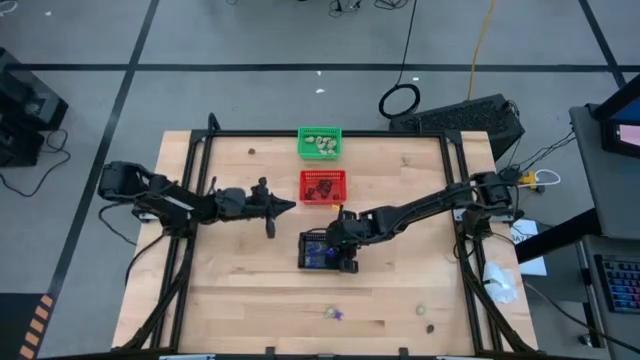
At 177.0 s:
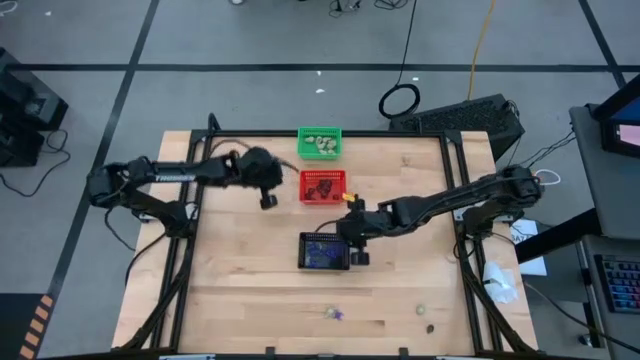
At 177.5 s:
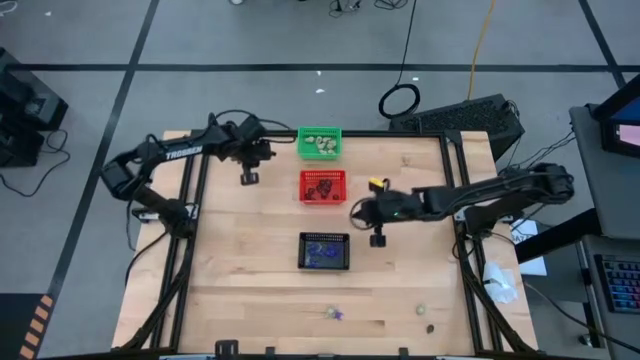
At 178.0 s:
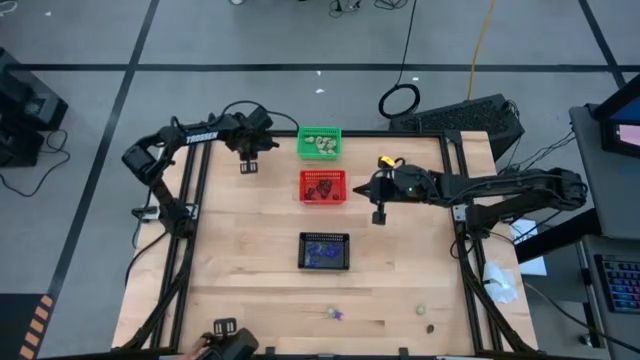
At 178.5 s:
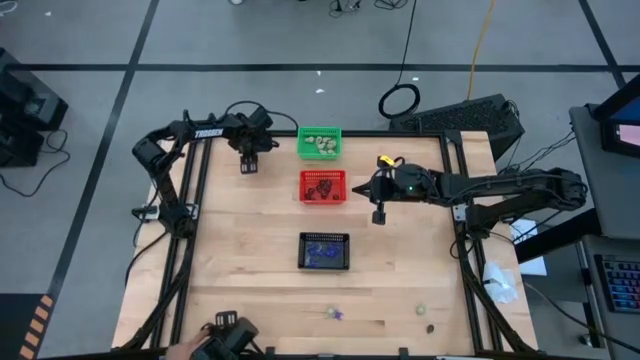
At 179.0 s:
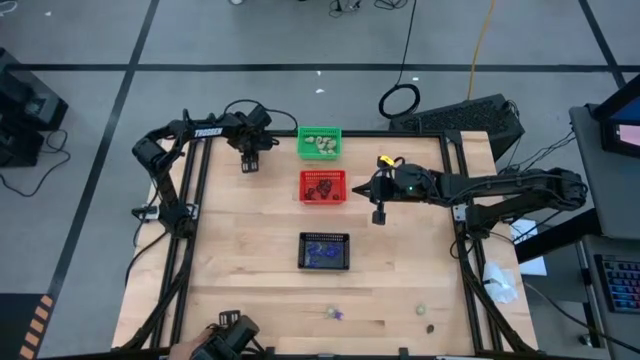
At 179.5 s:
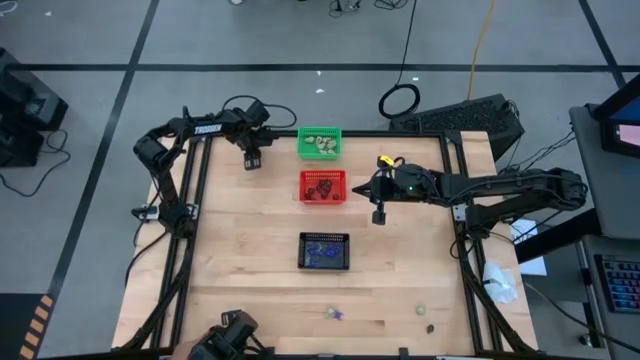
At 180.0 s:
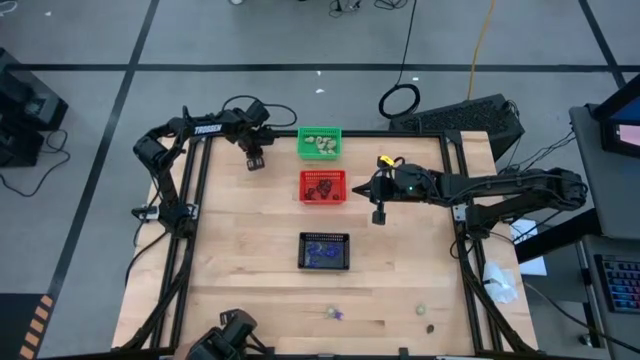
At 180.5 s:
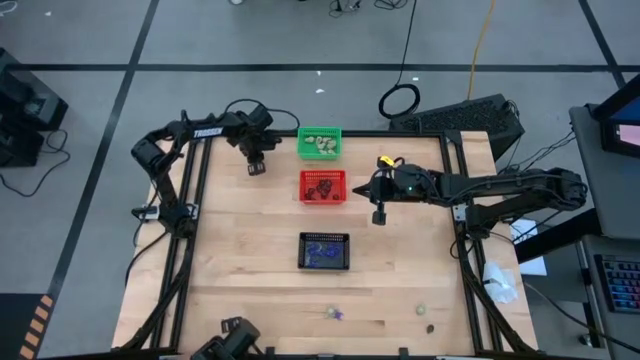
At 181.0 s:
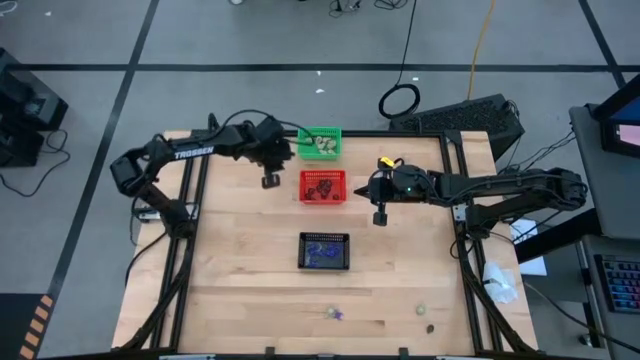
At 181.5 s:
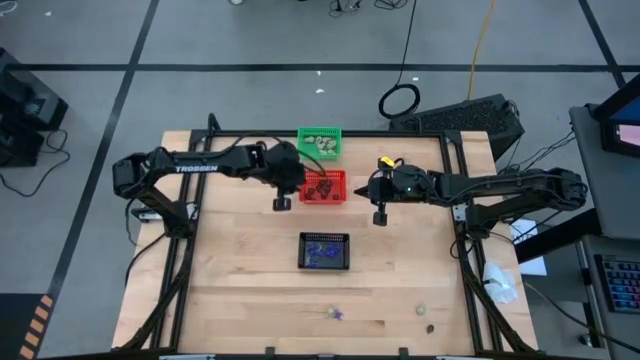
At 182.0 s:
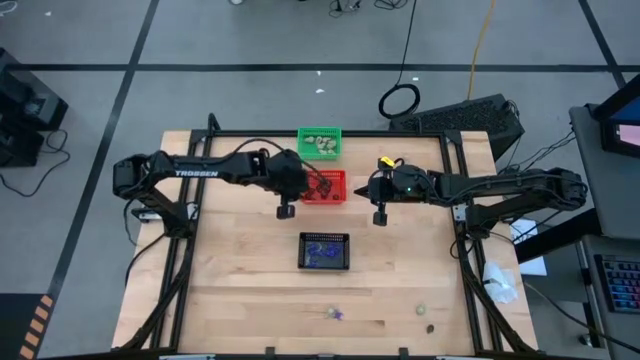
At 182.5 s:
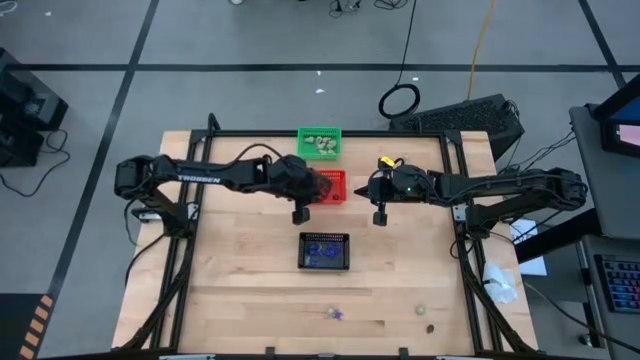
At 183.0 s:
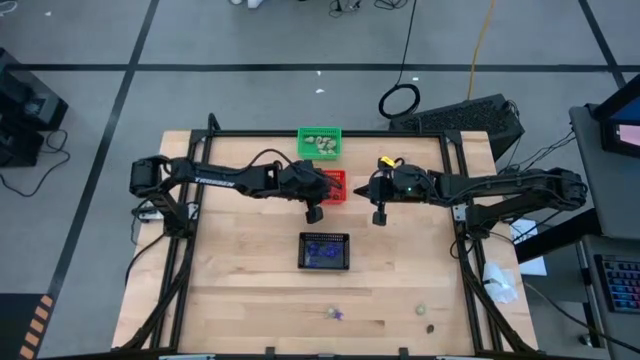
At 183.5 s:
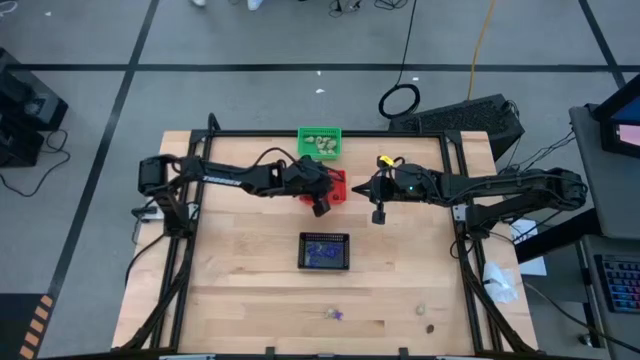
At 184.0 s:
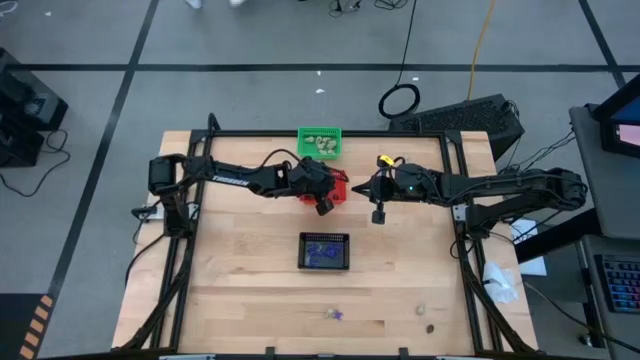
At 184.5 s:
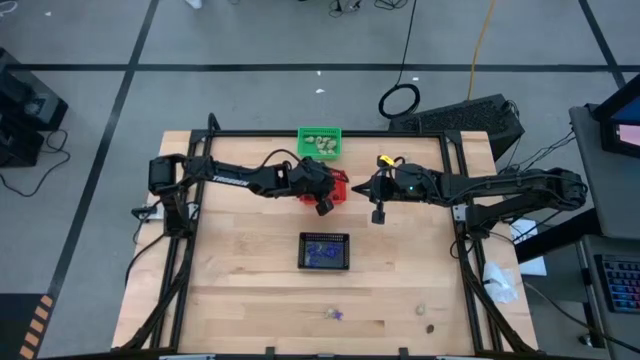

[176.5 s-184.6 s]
Task: Sort Halloween decoration
Put the black skull toy into the red basket

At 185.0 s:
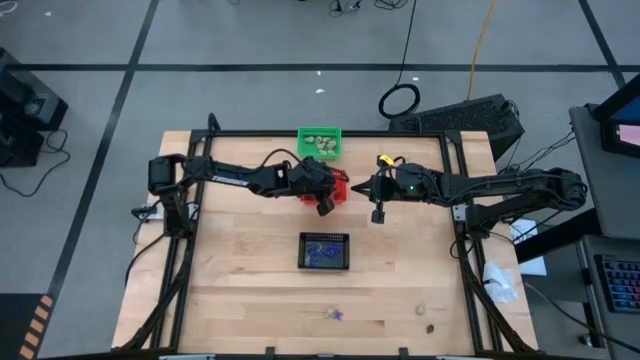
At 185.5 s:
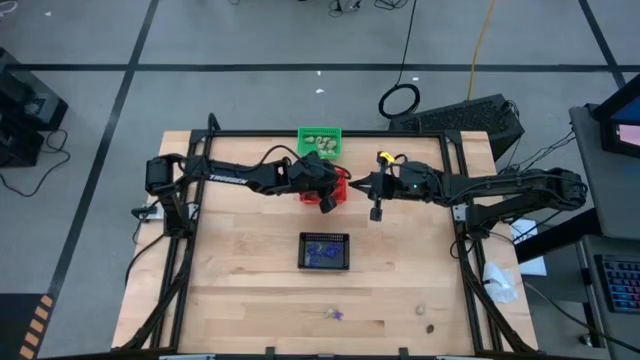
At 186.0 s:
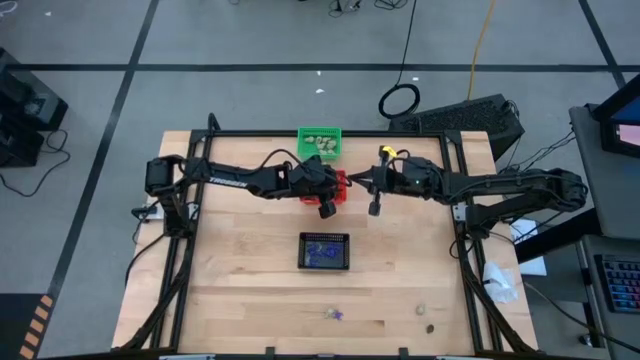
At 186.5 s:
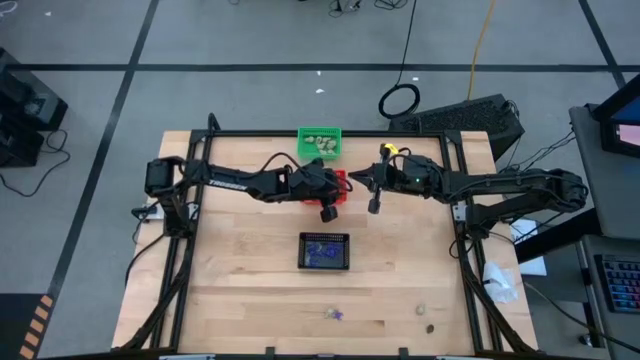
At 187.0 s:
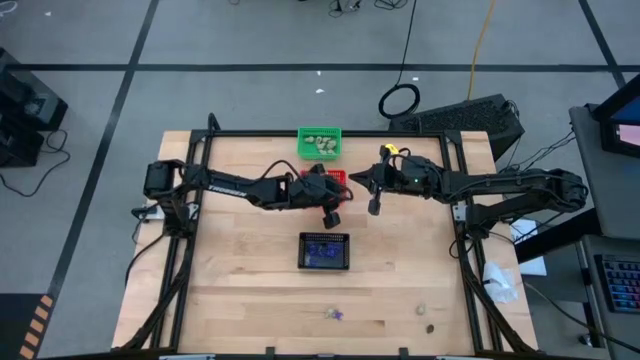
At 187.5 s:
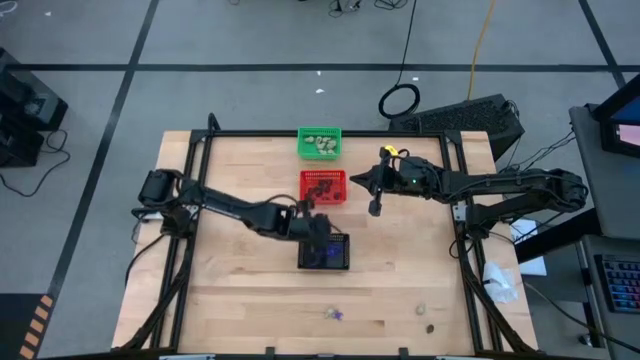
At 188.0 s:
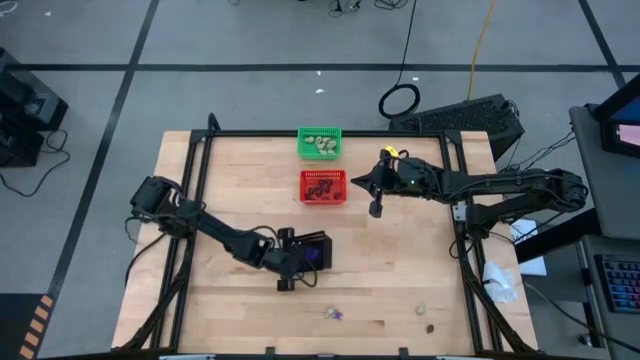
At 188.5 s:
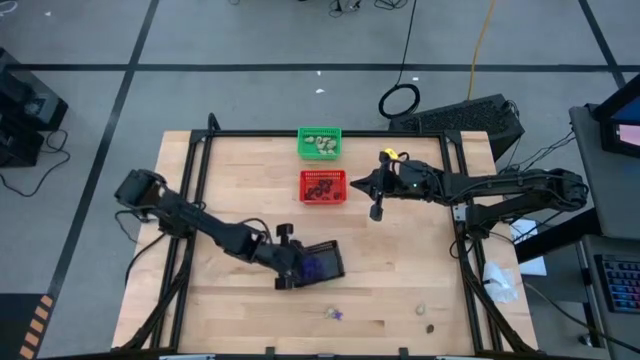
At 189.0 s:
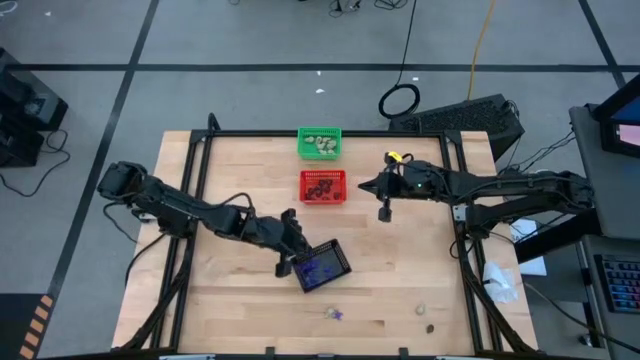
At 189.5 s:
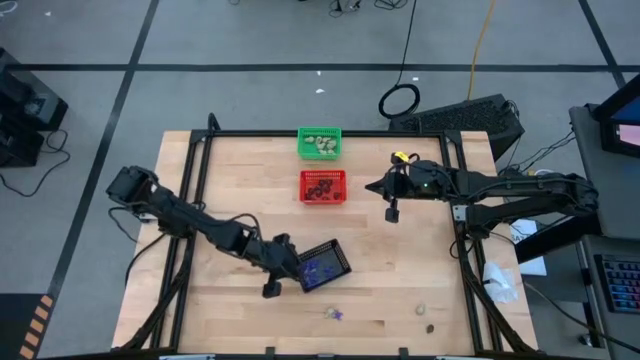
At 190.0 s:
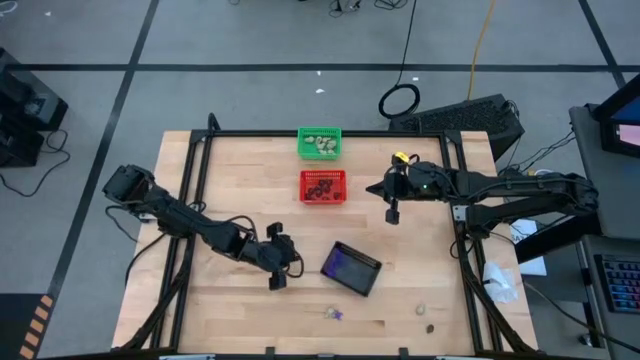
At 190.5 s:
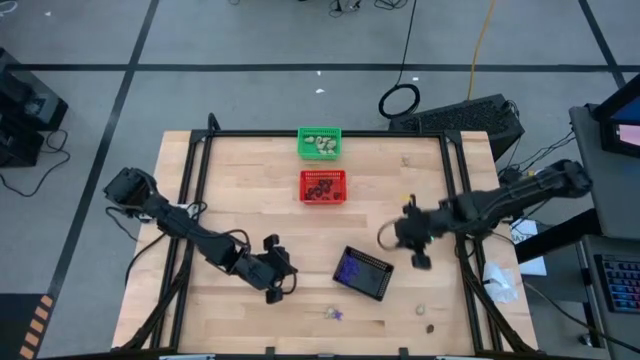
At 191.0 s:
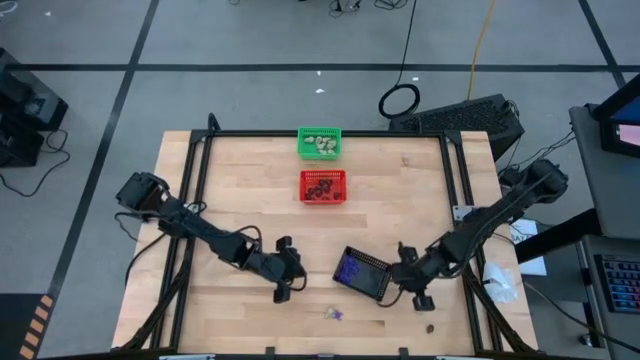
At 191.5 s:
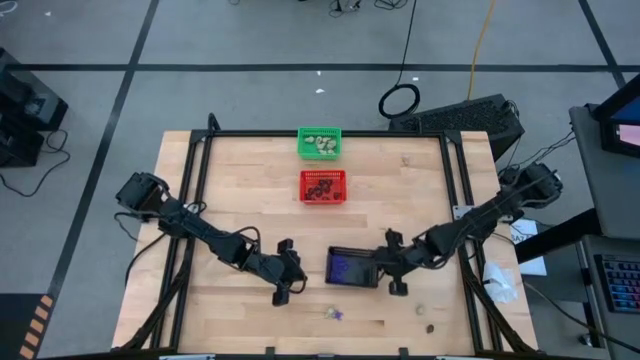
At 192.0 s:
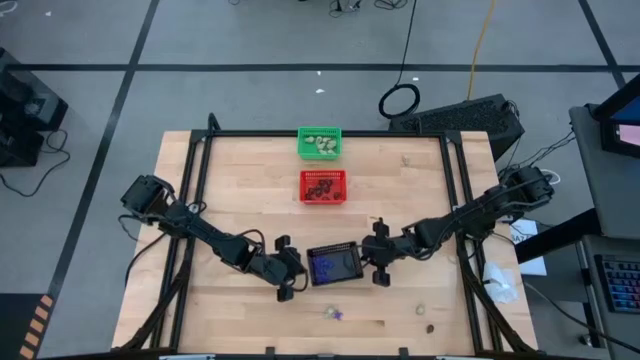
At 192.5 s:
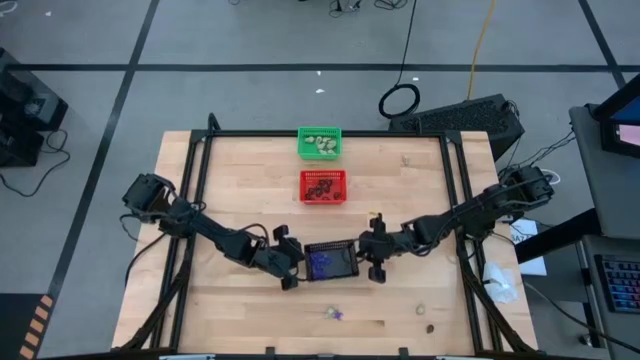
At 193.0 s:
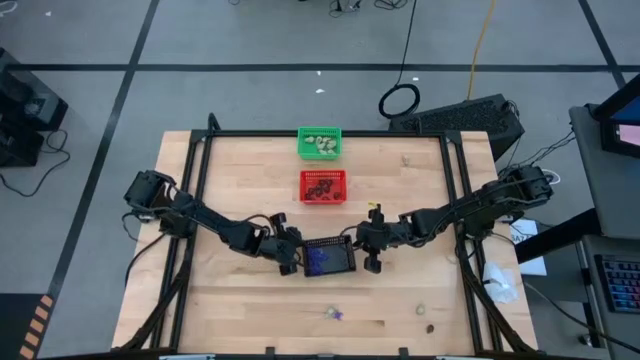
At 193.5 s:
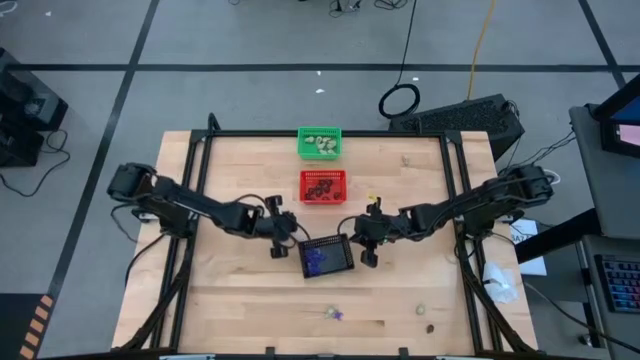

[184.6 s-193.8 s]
Adjust the black basket

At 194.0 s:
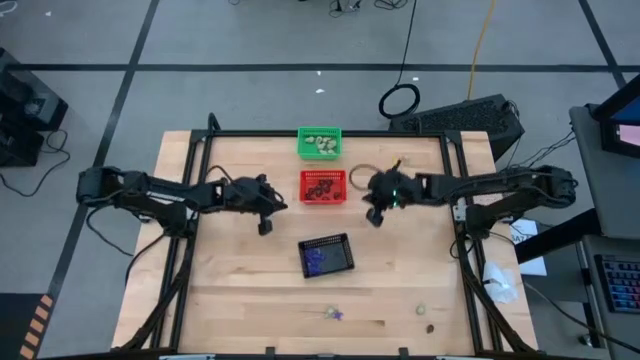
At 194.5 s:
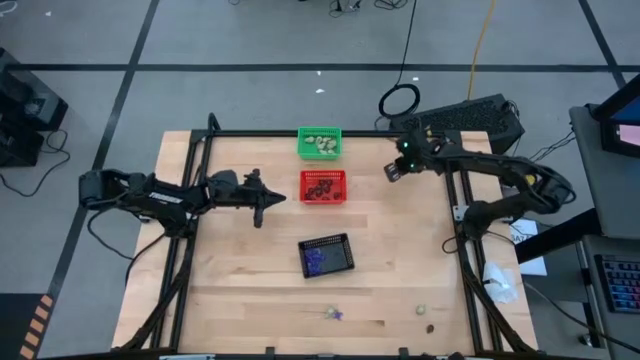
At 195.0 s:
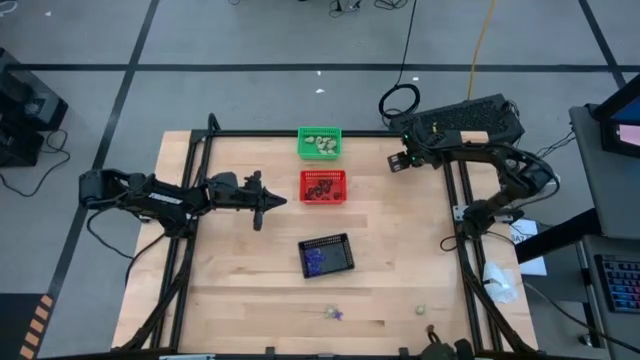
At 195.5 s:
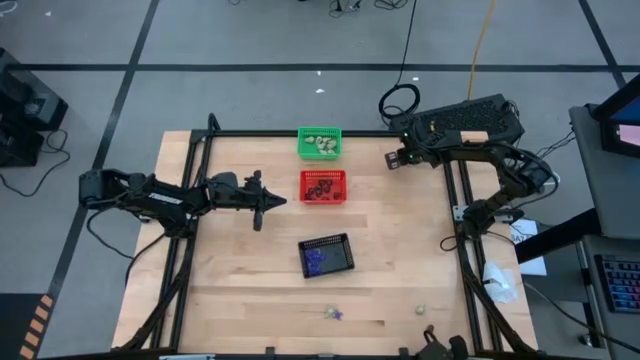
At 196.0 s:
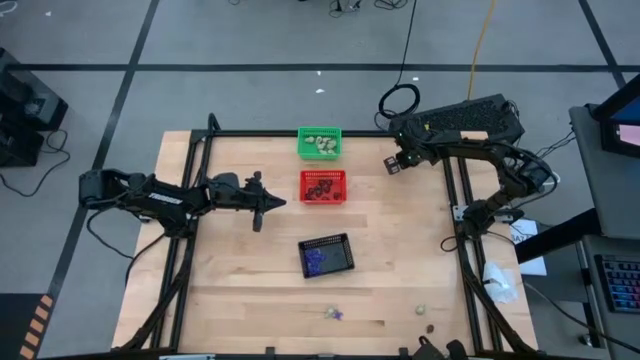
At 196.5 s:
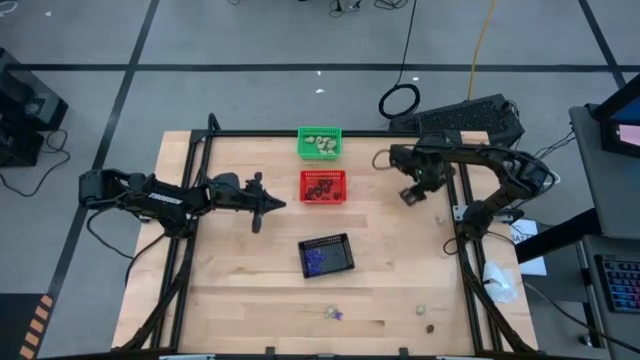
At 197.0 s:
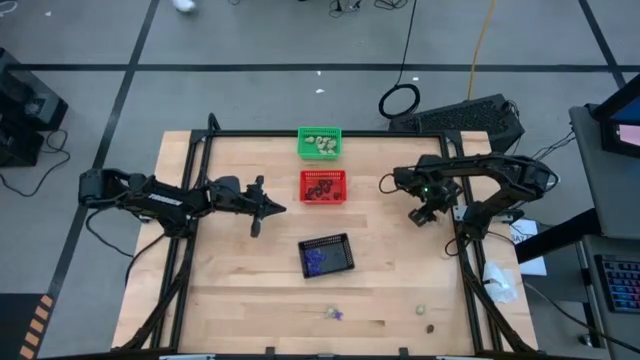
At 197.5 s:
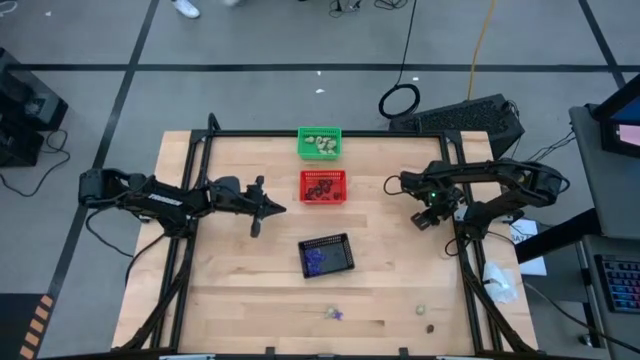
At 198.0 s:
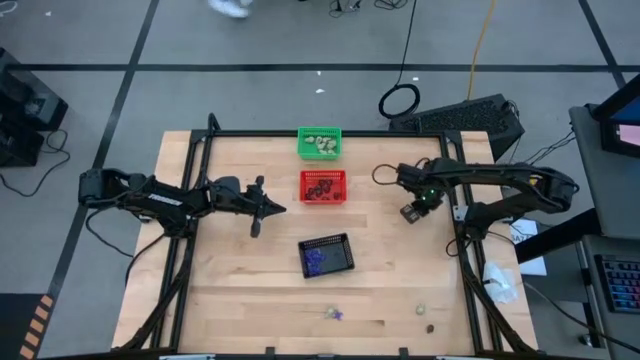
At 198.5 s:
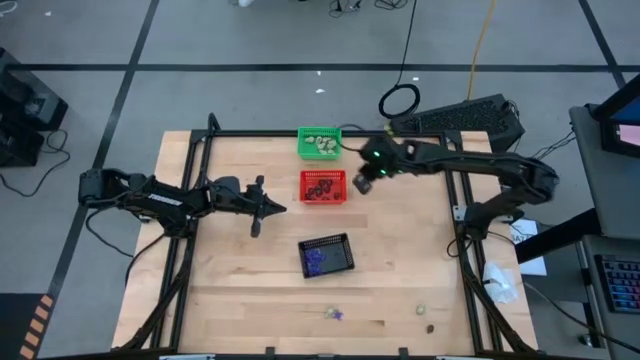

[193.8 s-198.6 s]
Put the white skull toy into the green basket
